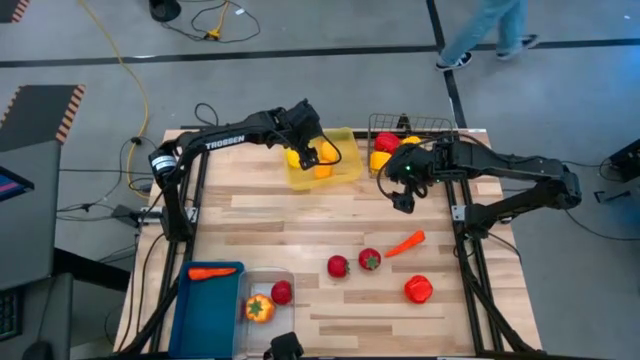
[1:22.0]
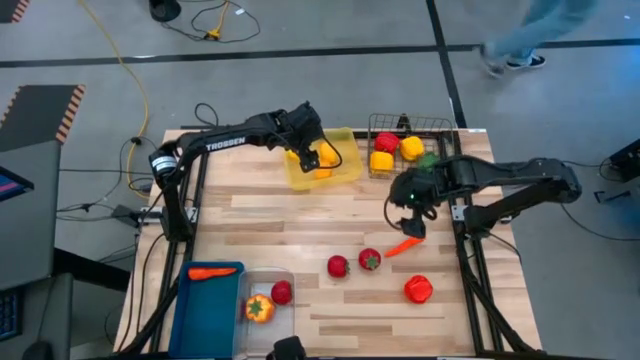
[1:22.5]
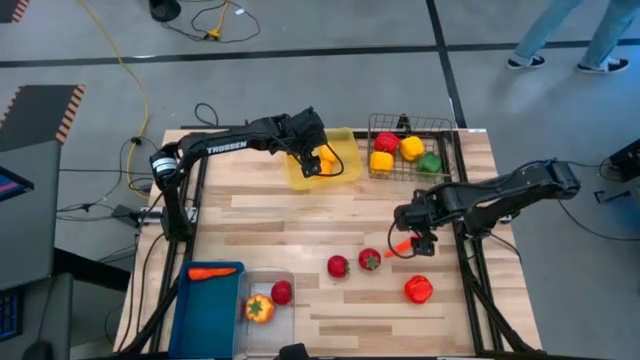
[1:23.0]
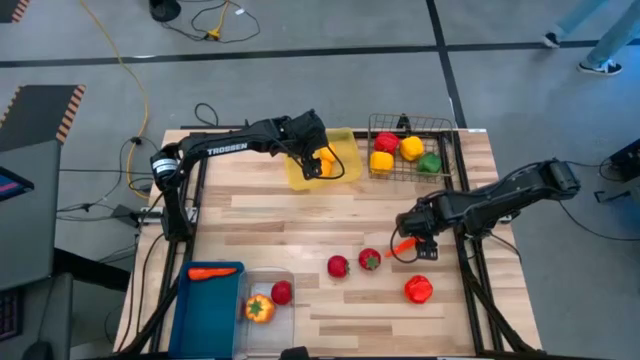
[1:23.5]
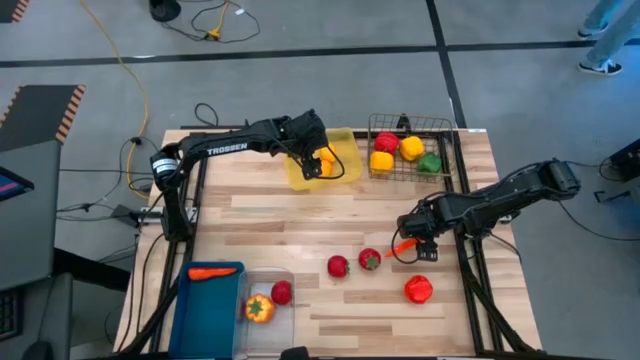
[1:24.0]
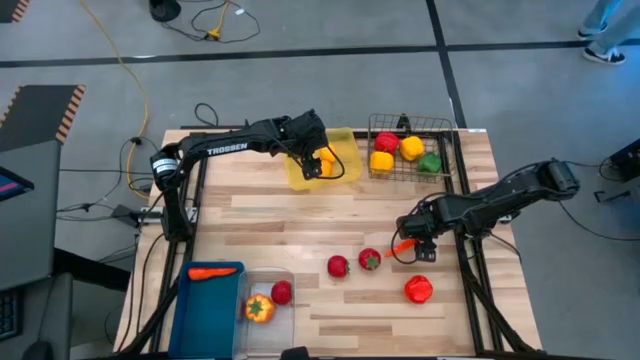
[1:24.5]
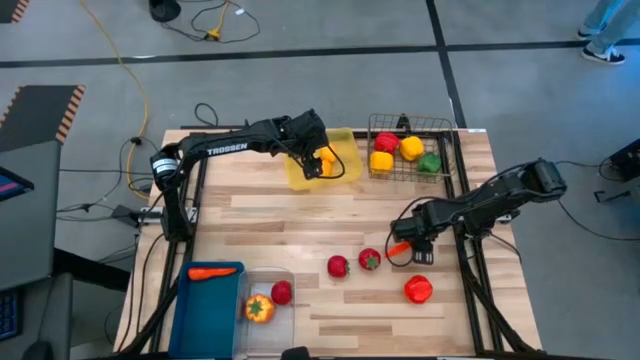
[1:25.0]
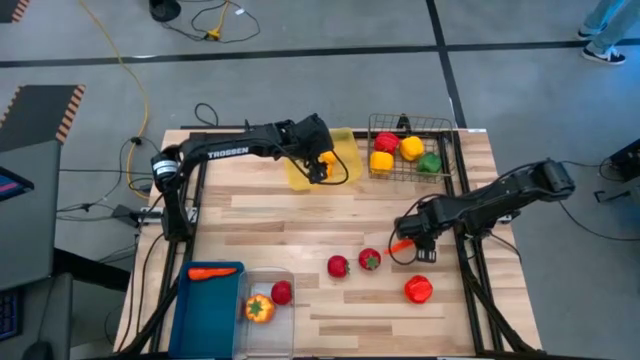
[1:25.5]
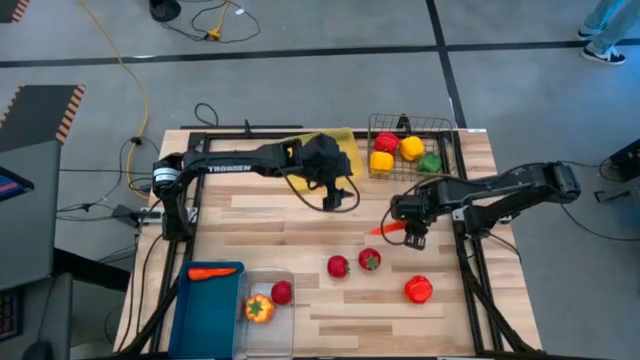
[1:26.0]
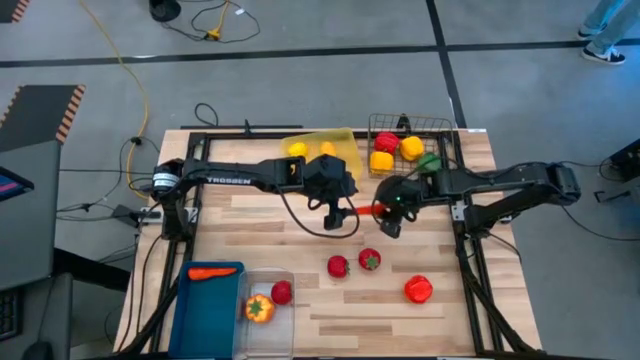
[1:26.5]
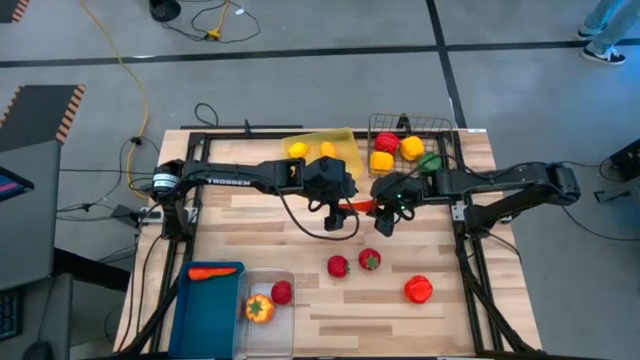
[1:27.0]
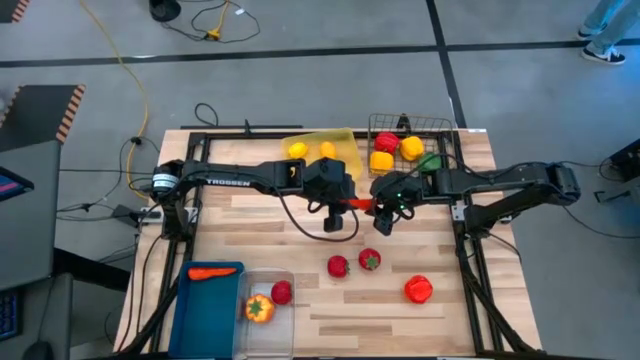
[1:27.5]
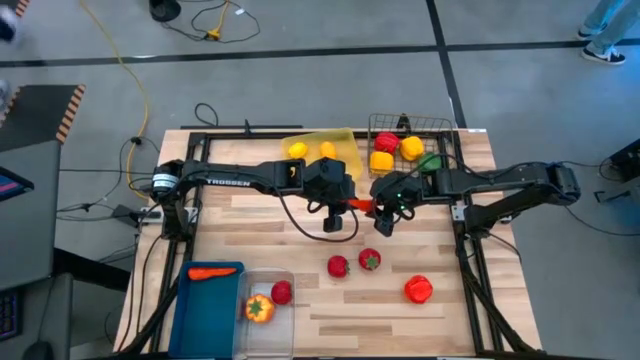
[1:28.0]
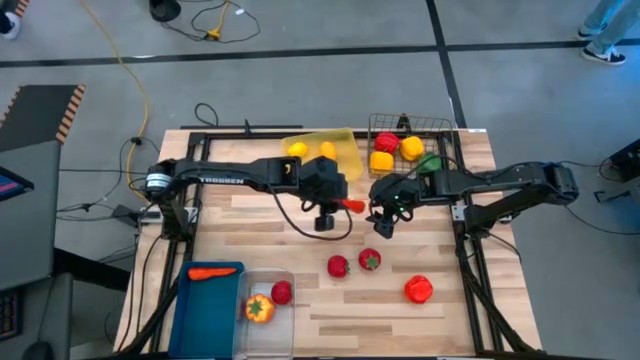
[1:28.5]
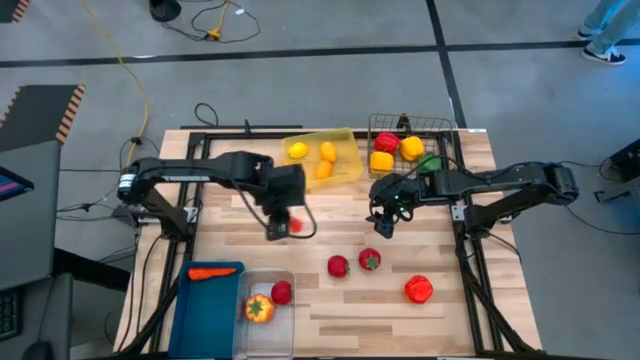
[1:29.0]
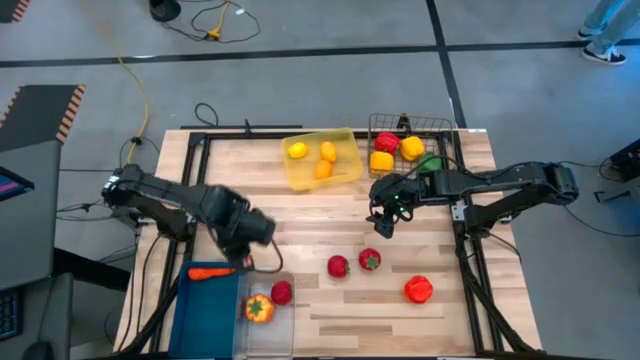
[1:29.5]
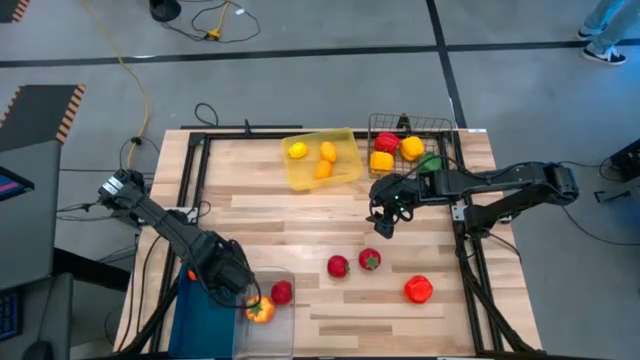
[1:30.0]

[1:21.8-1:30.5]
Task: Sort produce into baskets
Put the carrot into the blue bin

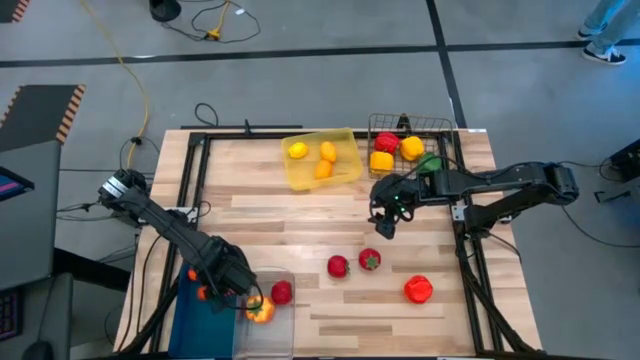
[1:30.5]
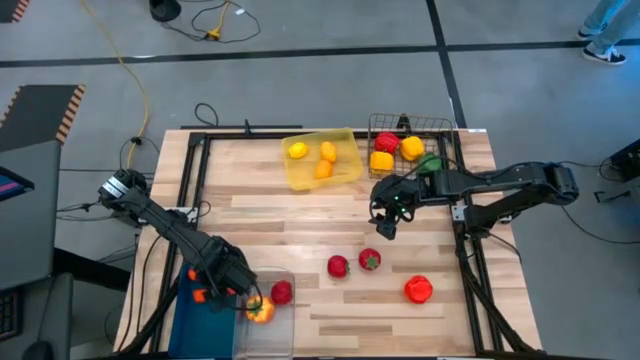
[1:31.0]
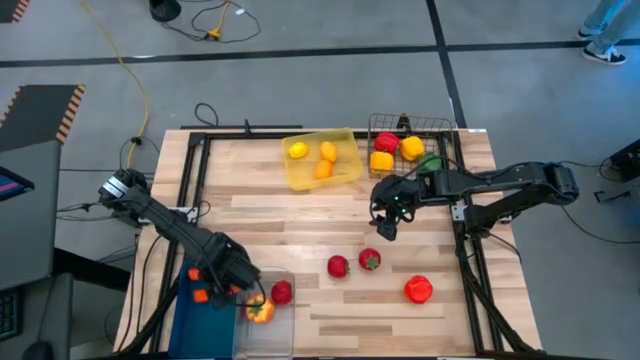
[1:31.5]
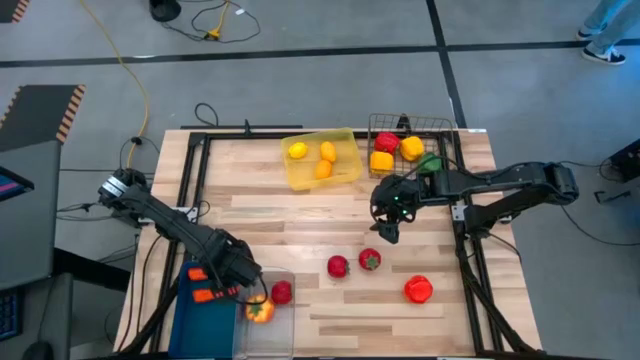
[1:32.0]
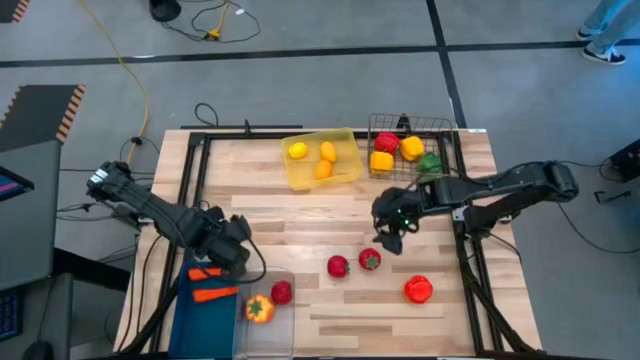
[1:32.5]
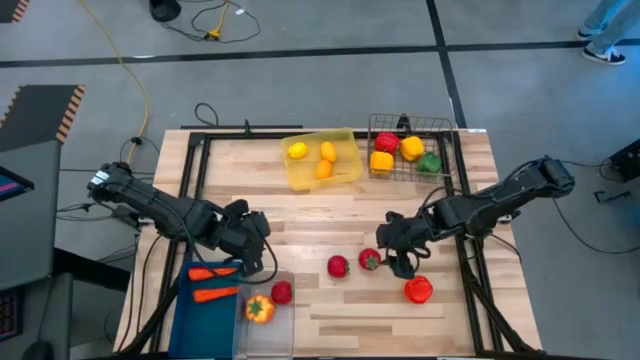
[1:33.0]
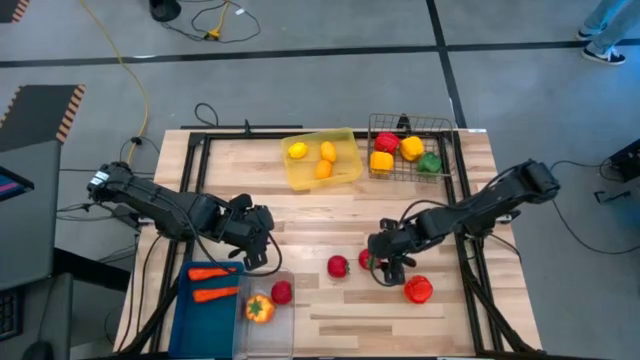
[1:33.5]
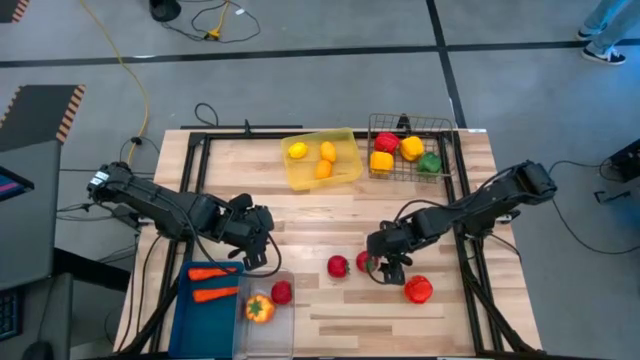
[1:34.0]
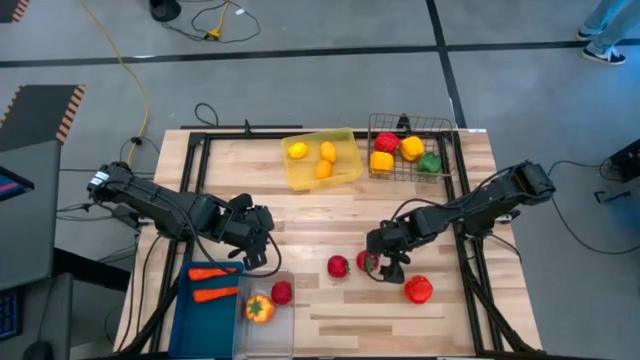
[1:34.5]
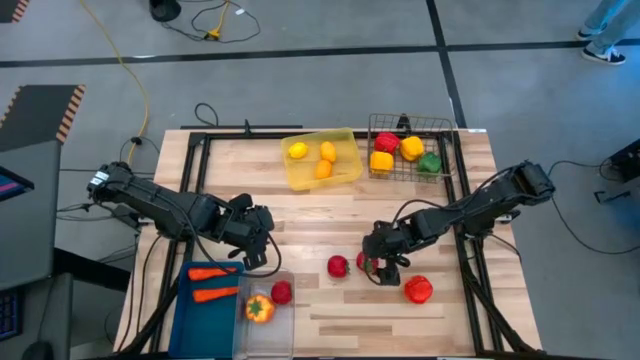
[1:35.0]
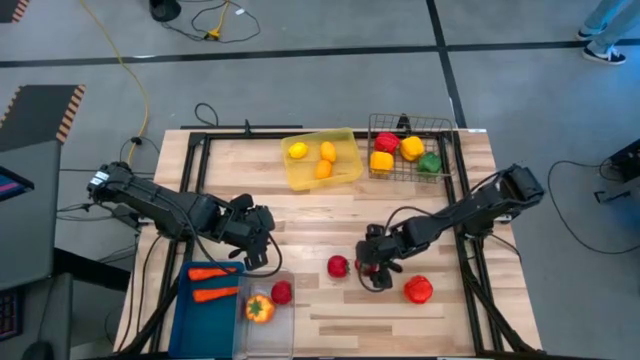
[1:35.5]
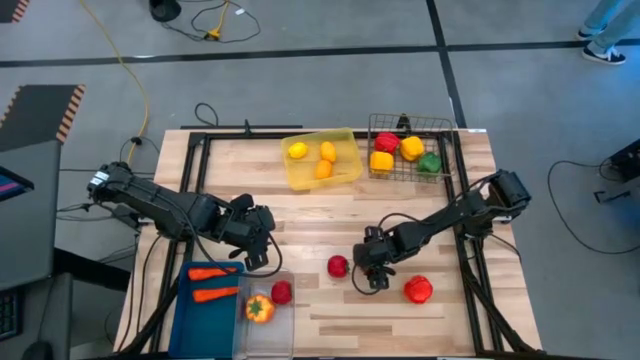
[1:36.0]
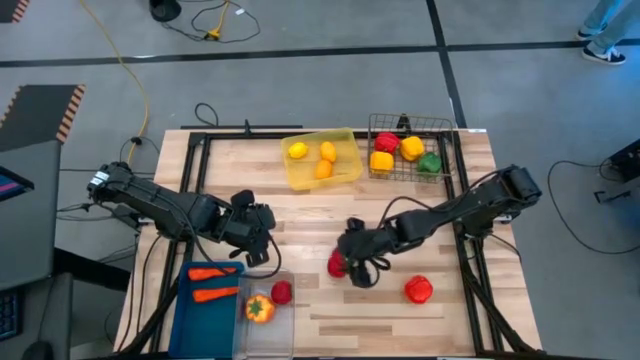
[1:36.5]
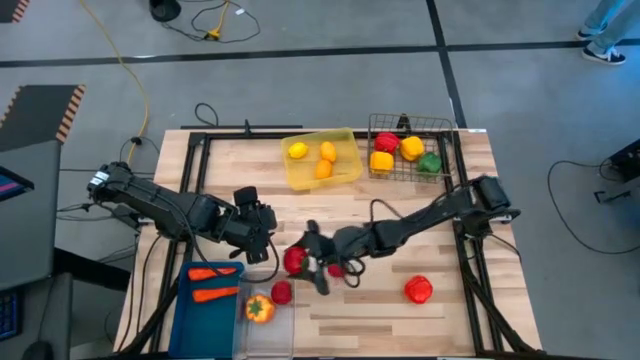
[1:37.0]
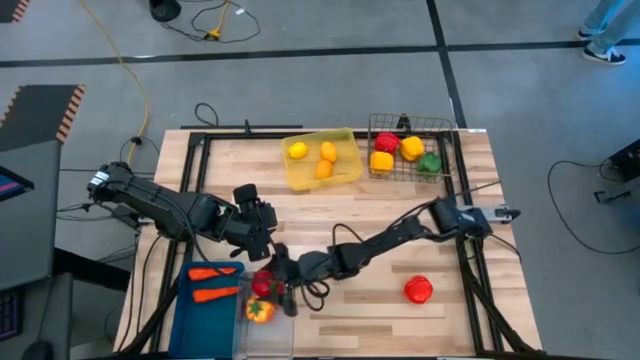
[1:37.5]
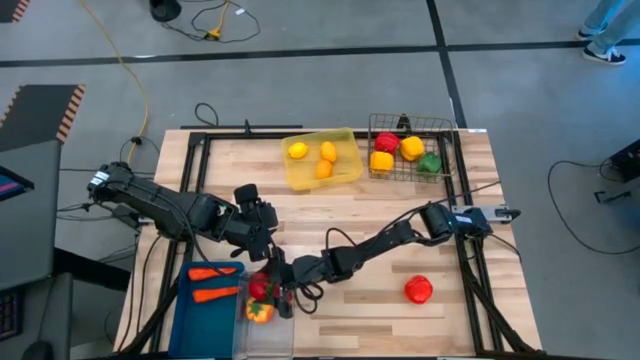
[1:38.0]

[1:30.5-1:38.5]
Put the right red tomato into the transparent bin

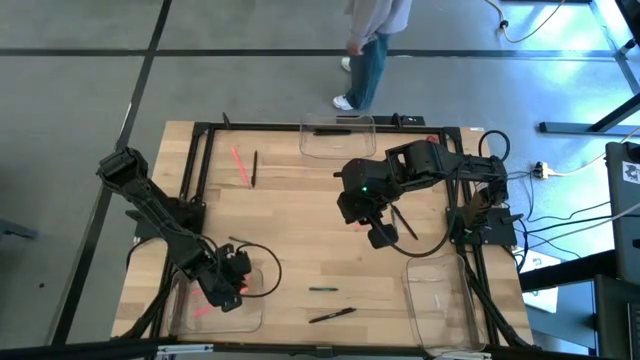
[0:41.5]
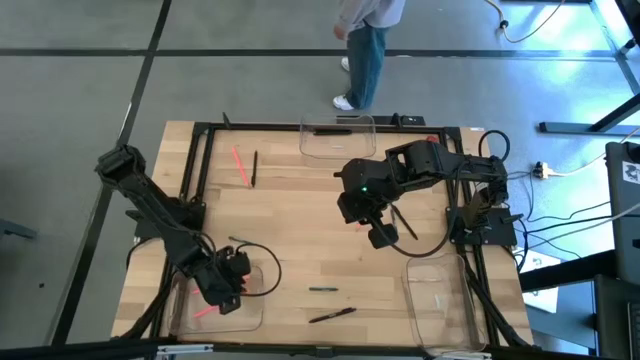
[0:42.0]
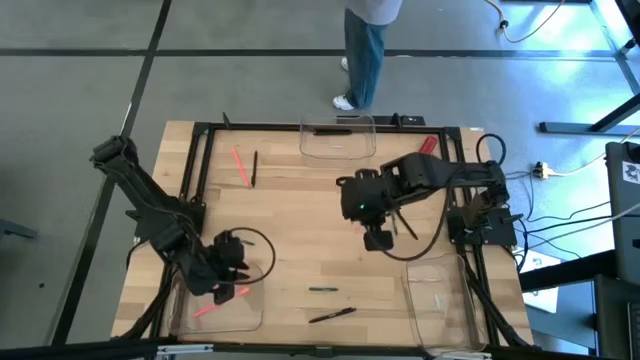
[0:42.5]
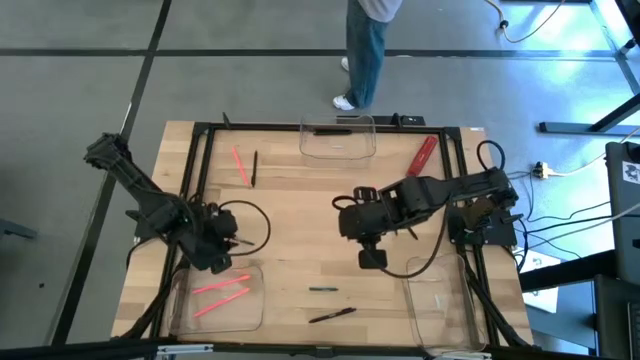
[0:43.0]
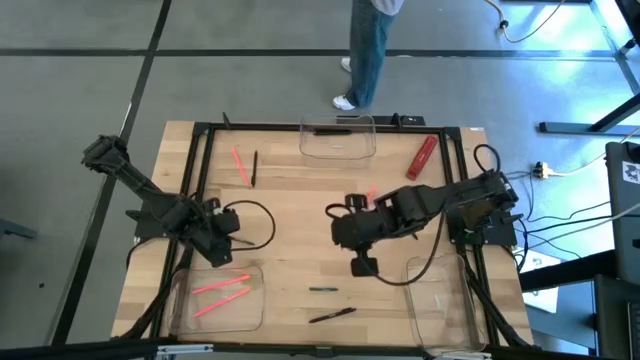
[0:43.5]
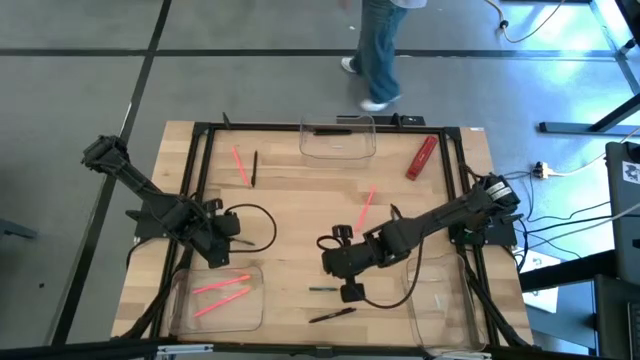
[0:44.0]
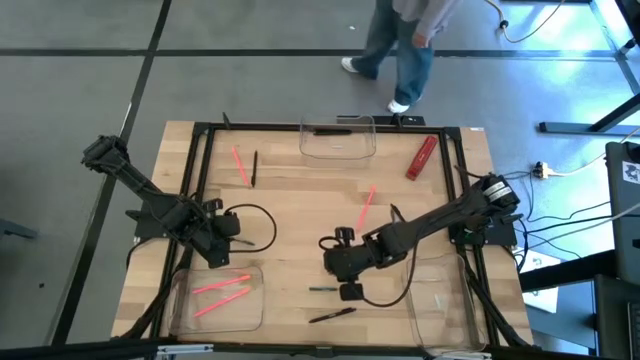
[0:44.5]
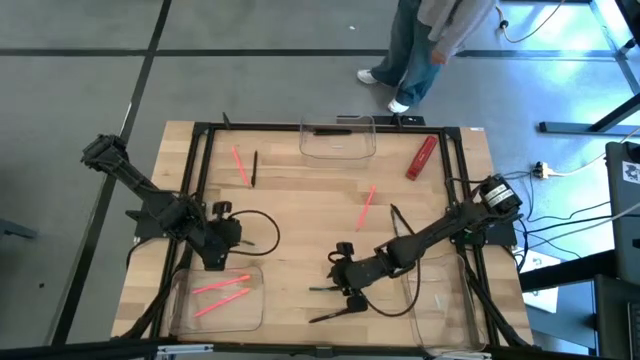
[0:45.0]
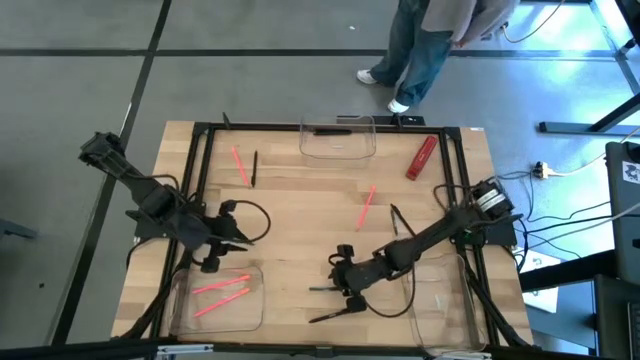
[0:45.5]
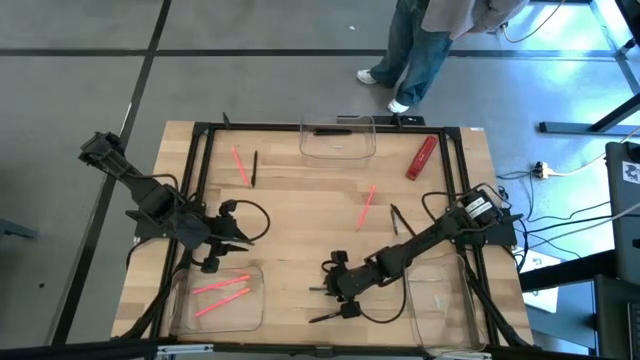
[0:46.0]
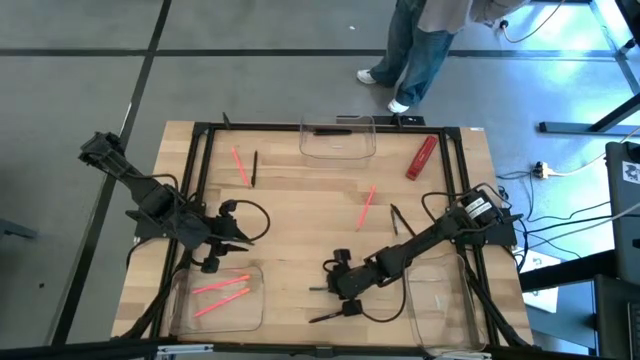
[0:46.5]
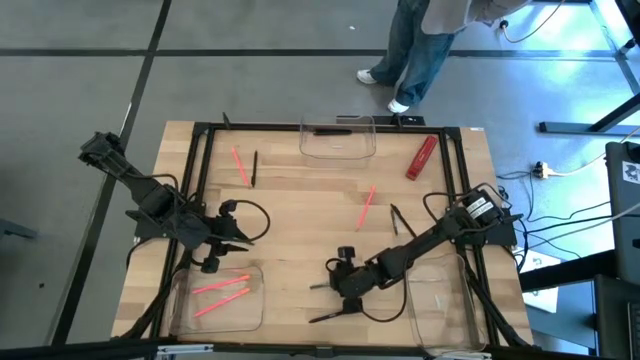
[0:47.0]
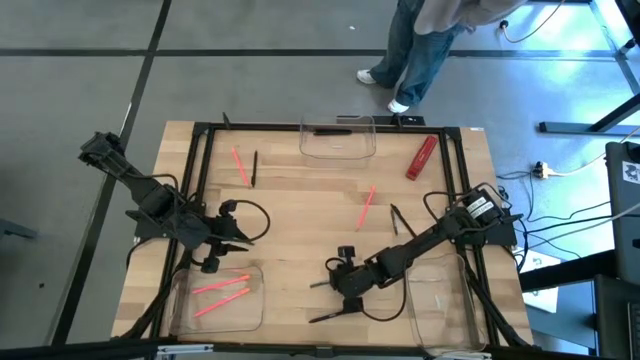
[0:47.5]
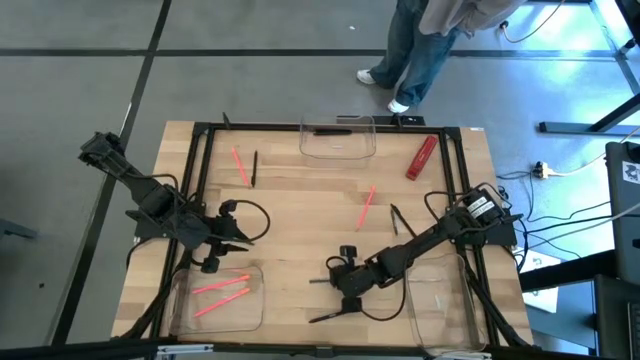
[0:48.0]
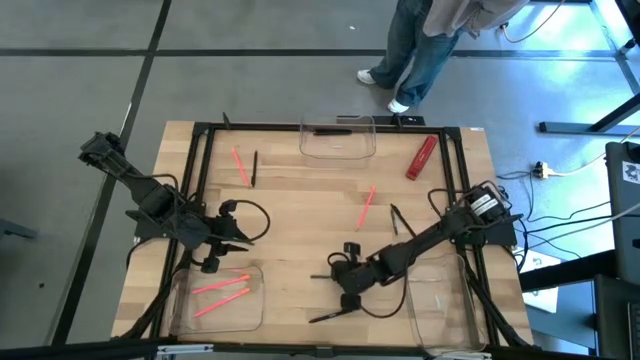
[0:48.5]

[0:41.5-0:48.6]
Task: Sort crayons/erasers/pens/pencils in bins
Put the green crayon into the bottom right transparent bin
